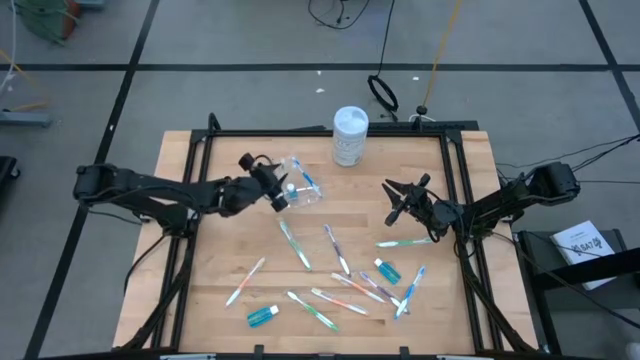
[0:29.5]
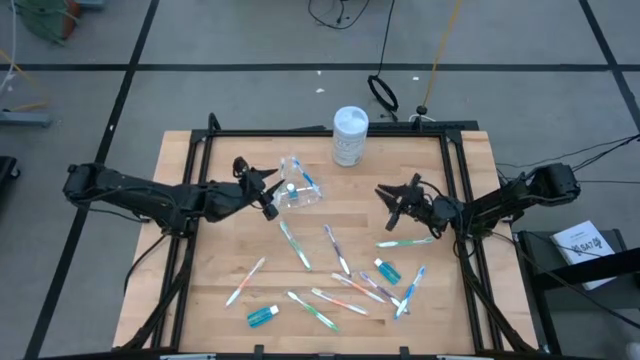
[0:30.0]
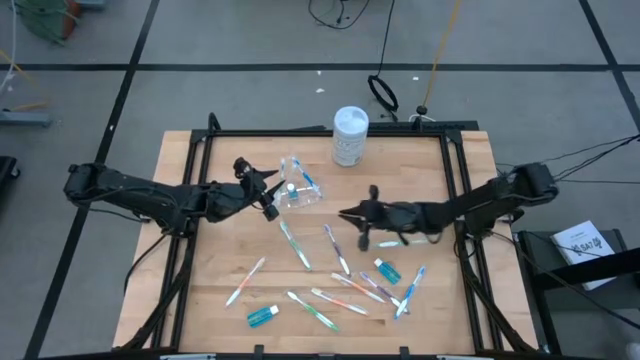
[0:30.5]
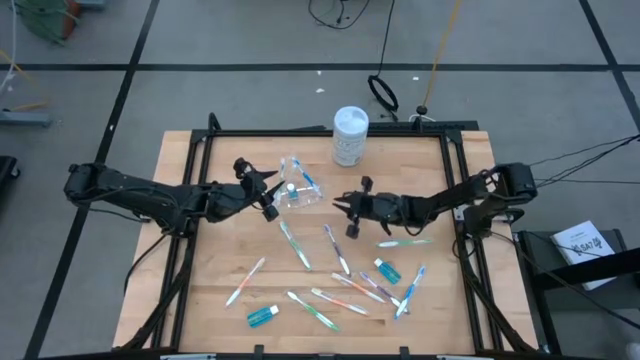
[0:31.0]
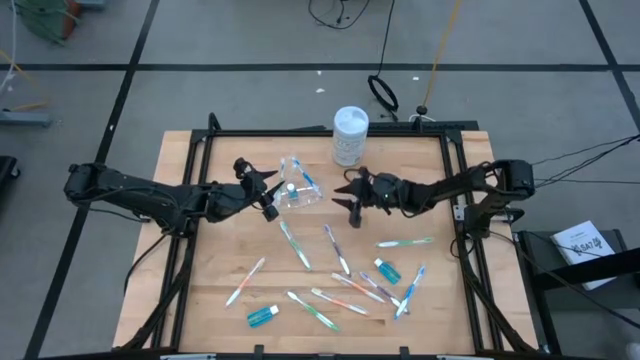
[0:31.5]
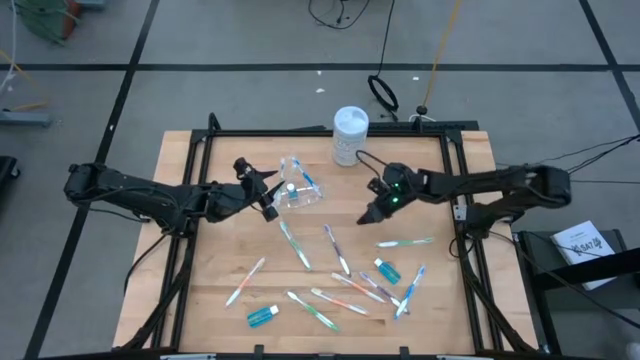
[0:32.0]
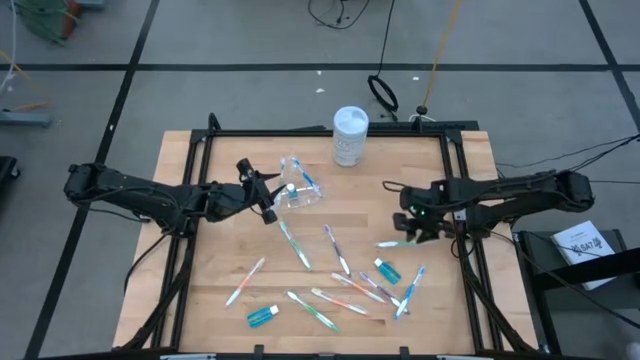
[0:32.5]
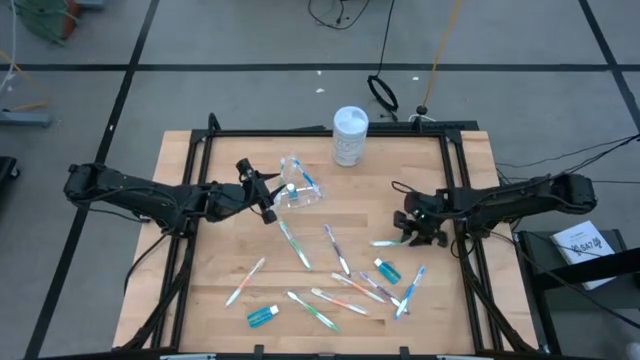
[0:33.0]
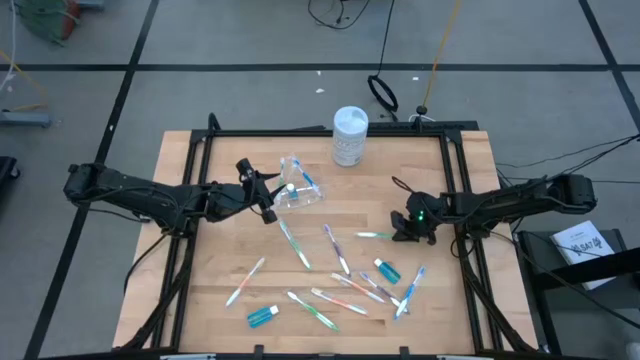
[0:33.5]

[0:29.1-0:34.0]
Task: Pick & Place toothbrushing station
Put the green toothbrush into the transparent organizer

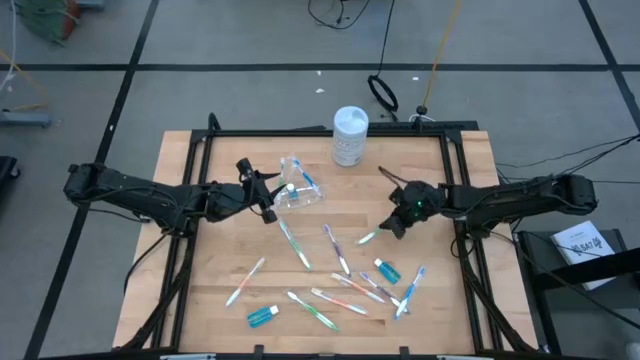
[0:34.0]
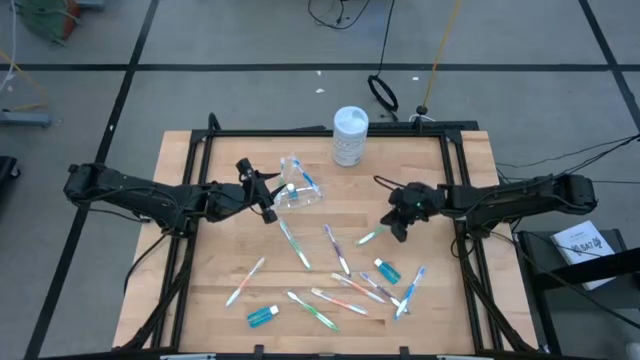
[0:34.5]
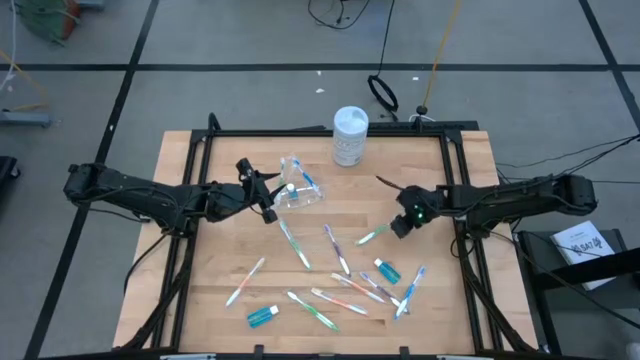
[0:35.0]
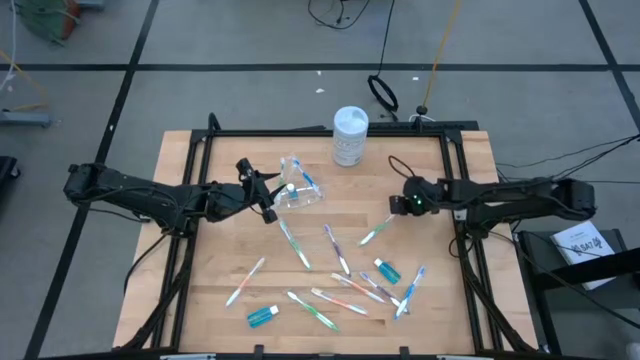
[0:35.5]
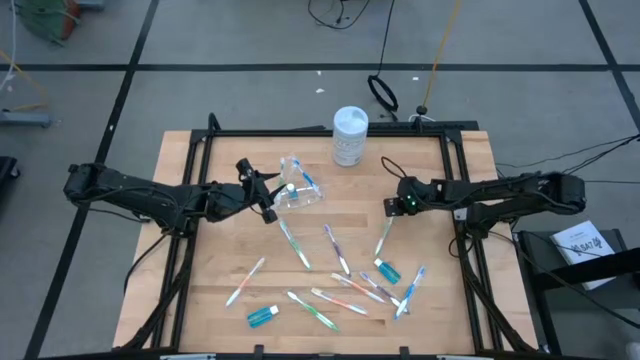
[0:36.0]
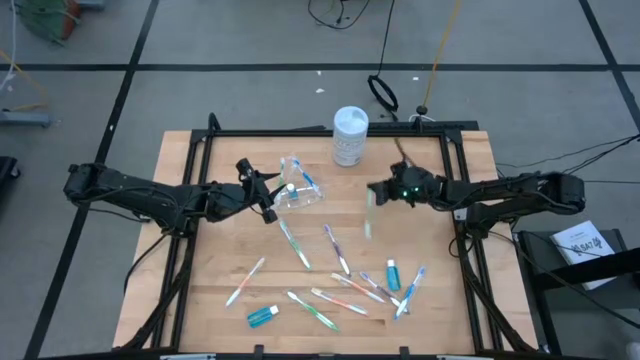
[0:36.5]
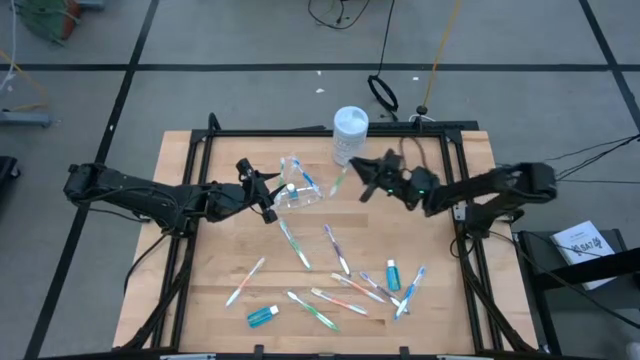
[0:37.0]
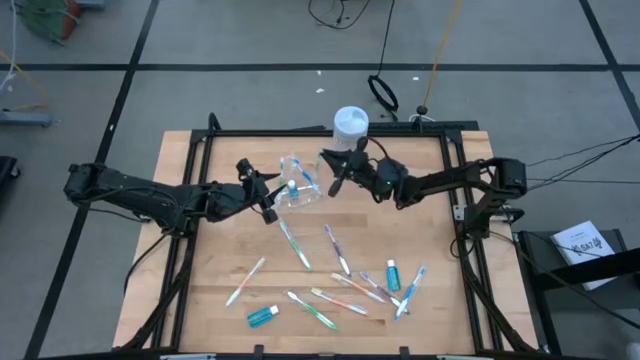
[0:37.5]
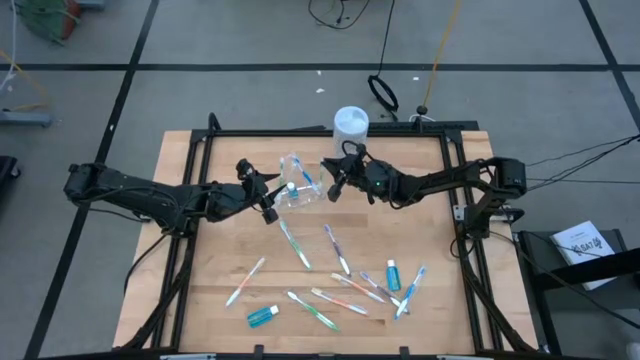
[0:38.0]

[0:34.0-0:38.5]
Put the green toothbrush into the transparent organizer

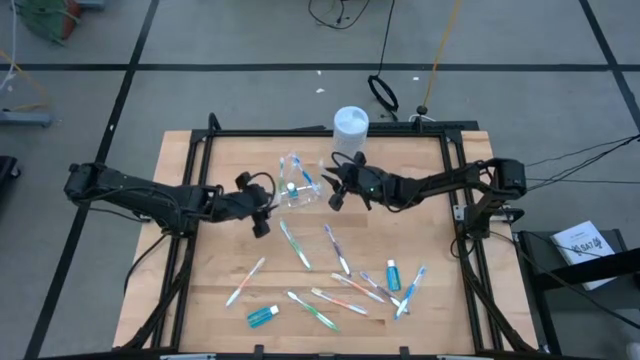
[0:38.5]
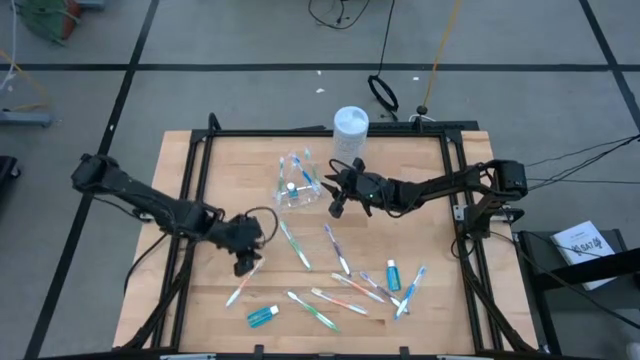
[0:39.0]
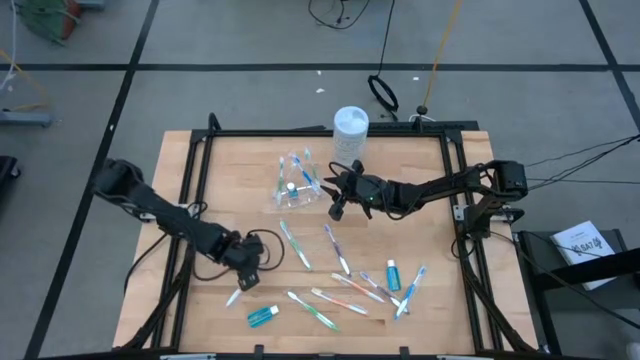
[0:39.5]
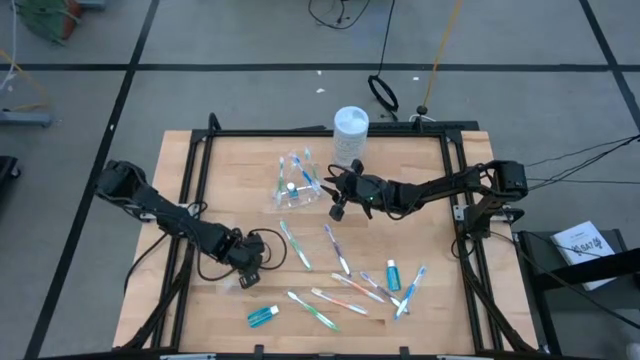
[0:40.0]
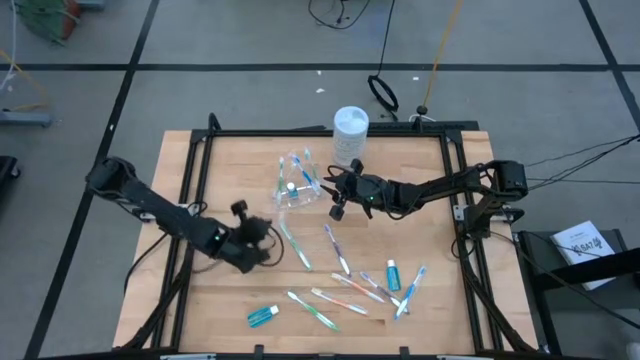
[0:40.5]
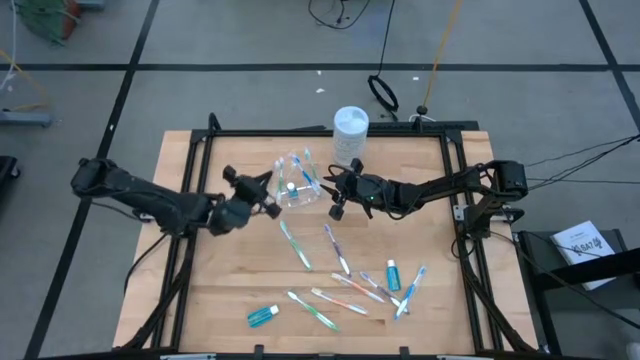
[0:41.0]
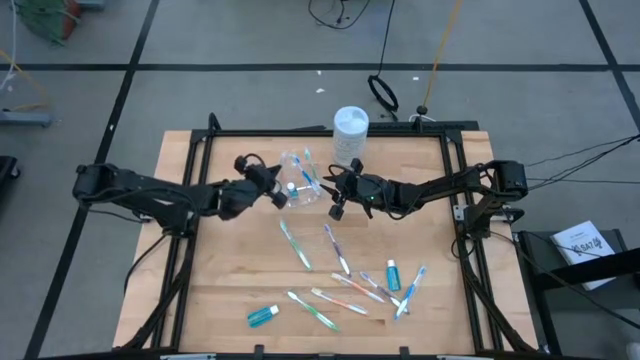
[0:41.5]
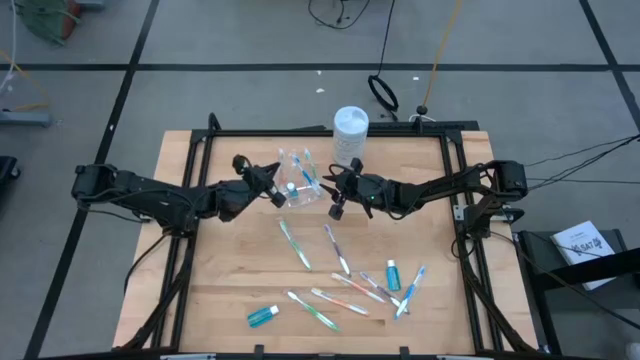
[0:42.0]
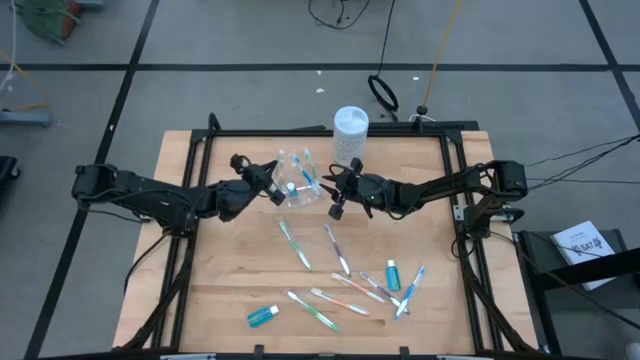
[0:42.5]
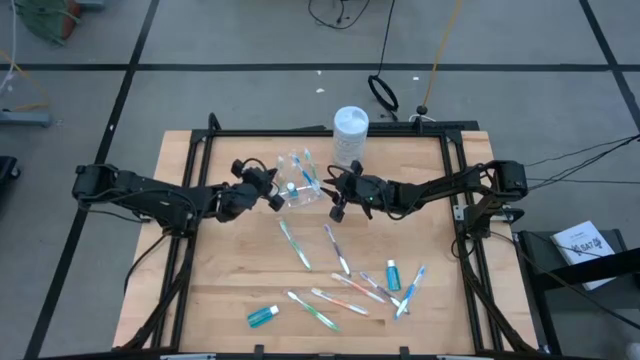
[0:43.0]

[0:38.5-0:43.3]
Put the orange toothbrush into the transparent organizer

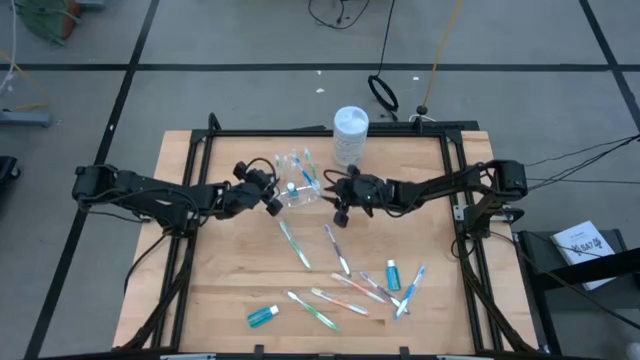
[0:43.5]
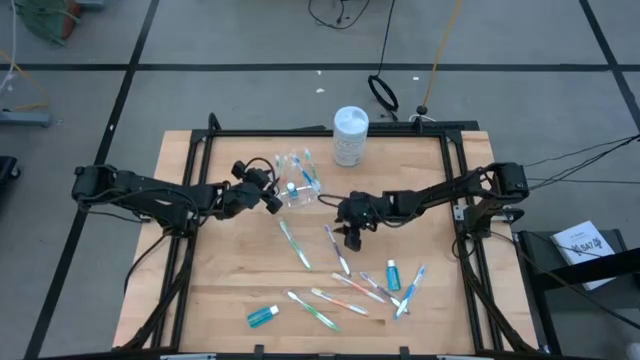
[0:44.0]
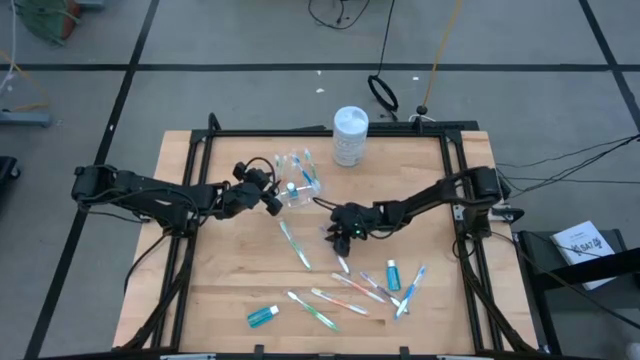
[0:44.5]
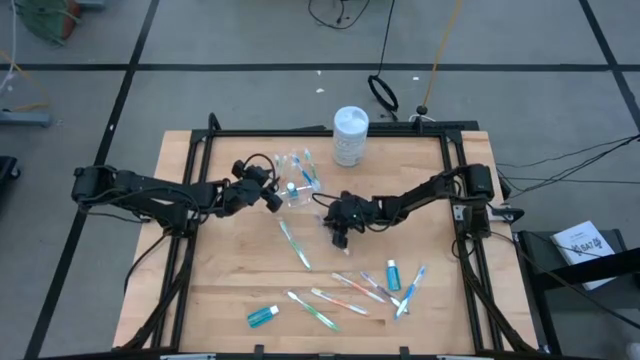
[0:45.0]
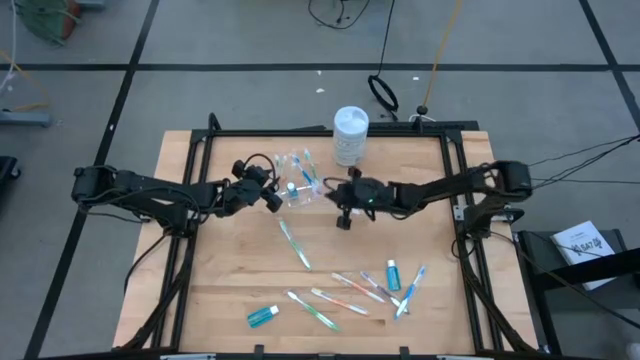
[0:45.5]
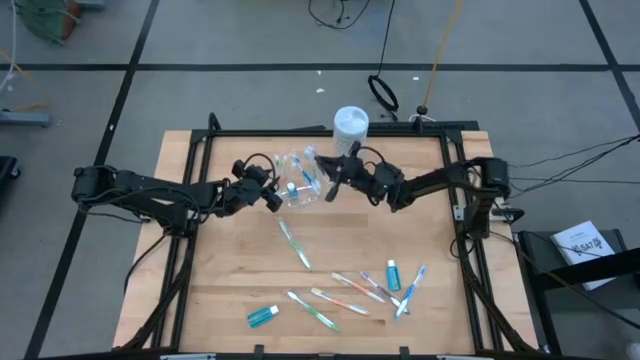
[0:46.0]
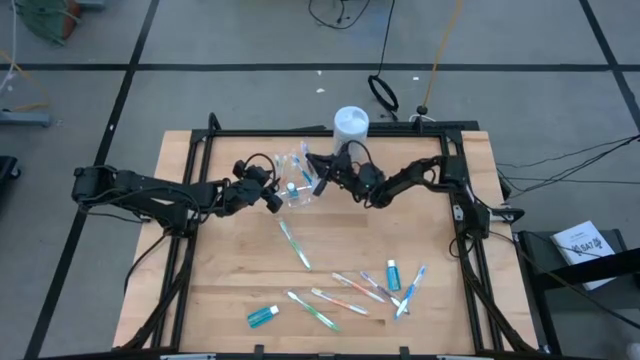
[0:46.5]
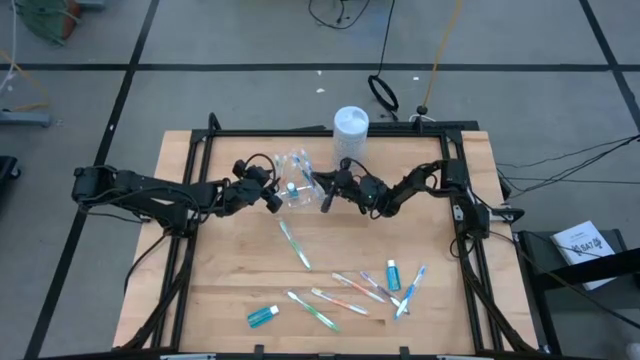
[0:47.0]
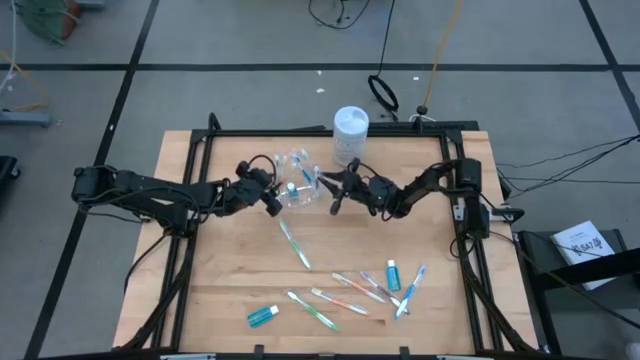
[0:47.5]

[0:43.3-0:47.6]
Put the purple toothbrush into the transparent organizer

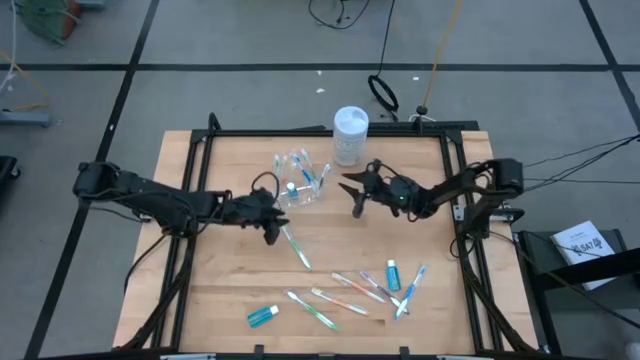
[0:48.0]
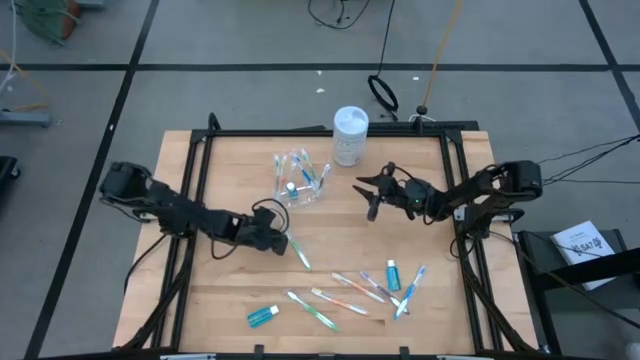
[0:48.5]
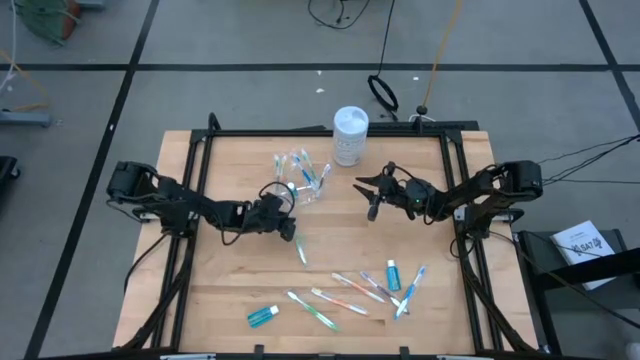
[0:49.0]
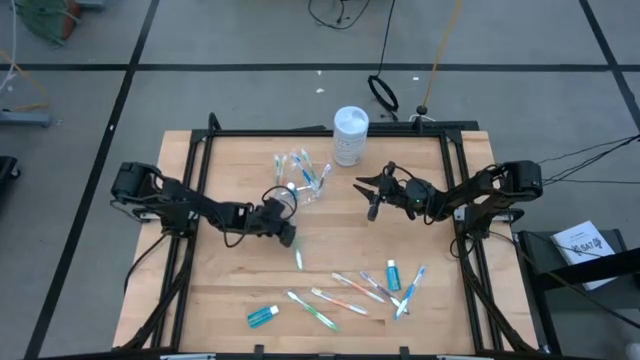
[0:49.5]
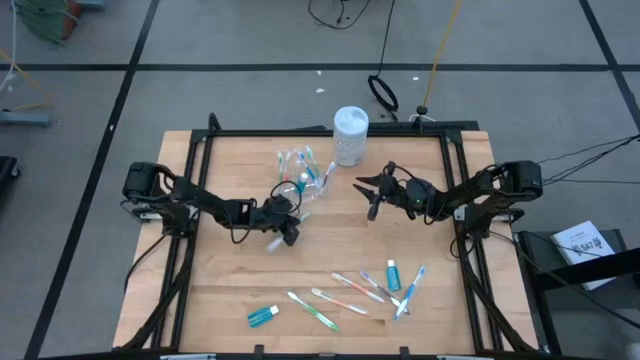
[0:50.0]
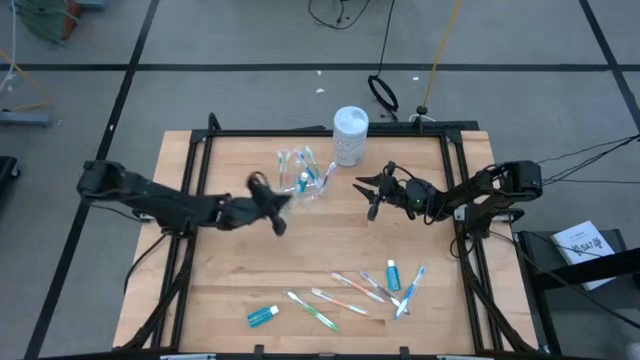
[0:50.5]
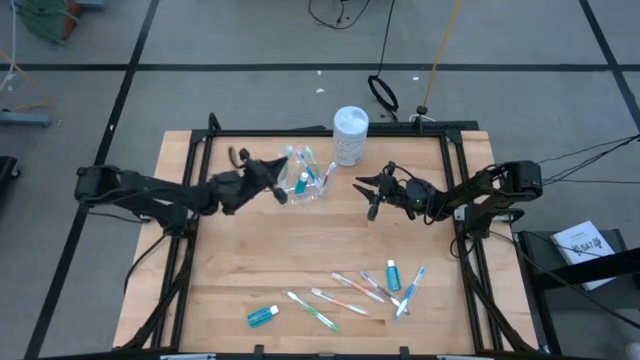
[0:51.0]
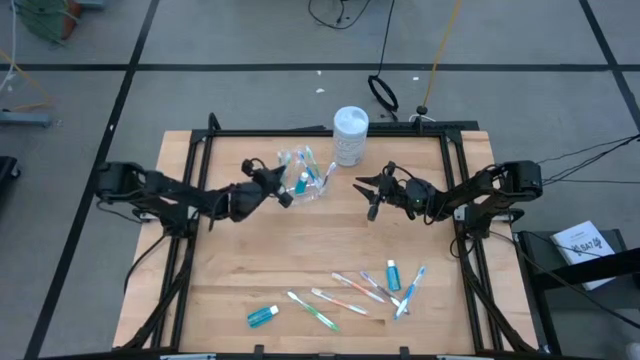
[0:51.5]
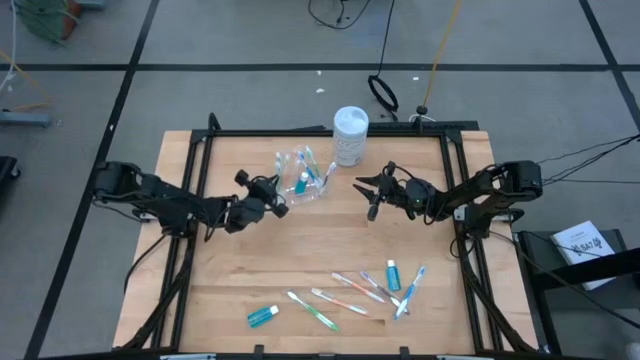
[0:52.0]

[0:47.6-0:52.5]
Put the green toothbrush into the transparent organizer
